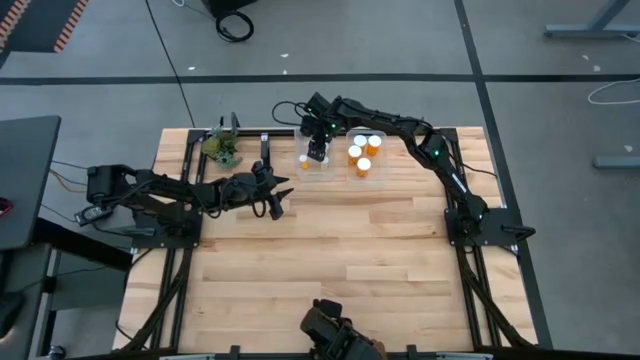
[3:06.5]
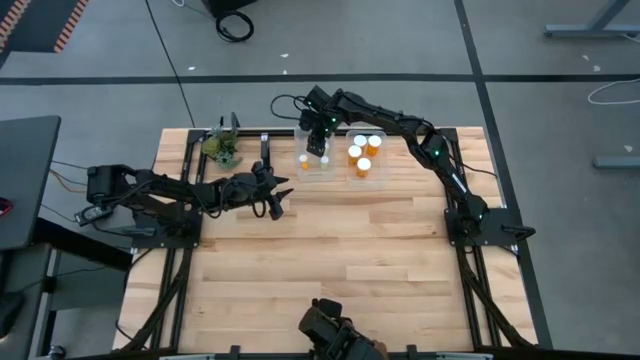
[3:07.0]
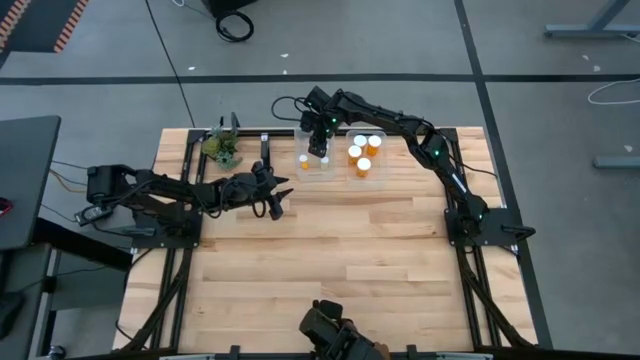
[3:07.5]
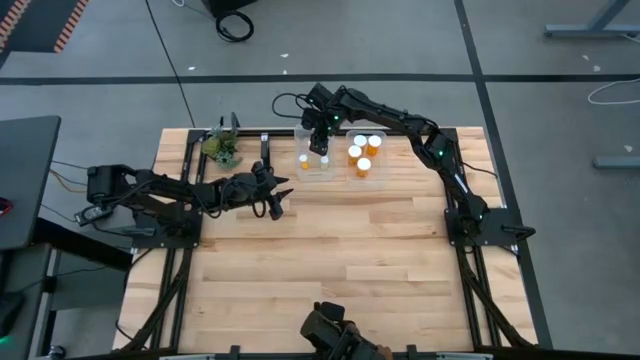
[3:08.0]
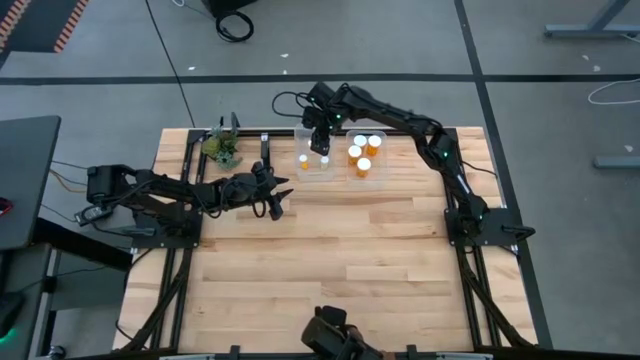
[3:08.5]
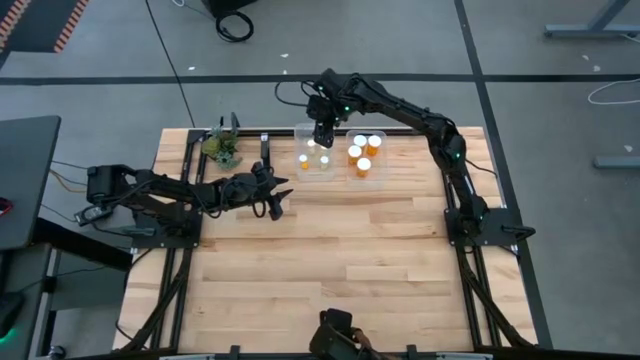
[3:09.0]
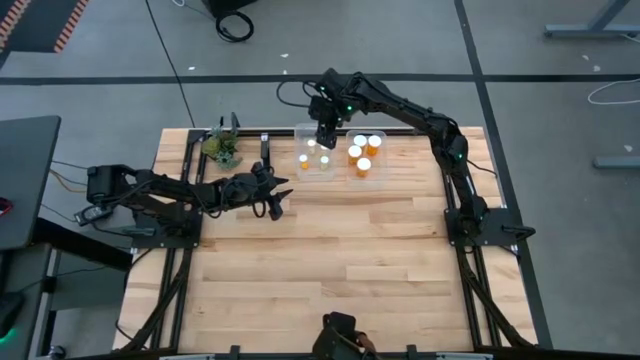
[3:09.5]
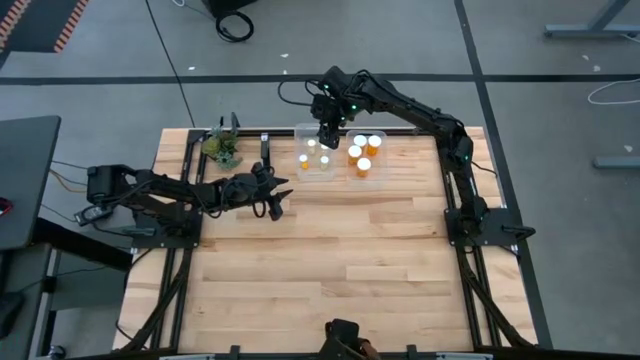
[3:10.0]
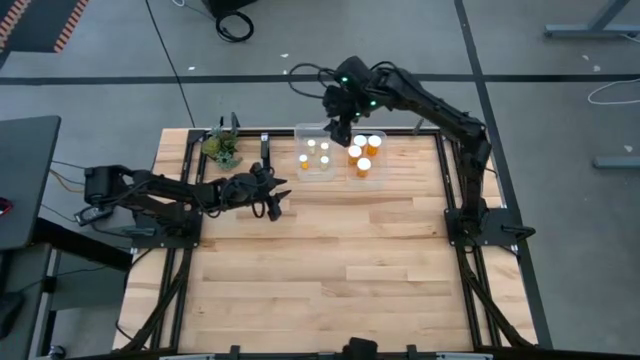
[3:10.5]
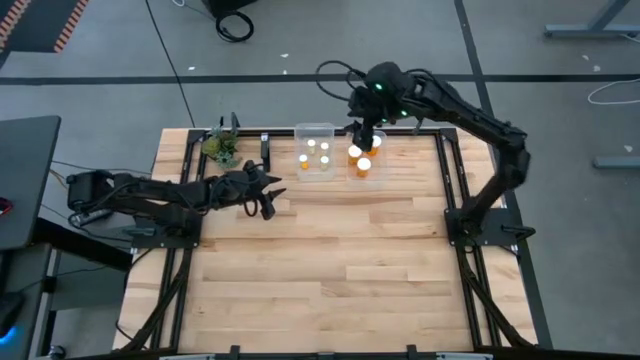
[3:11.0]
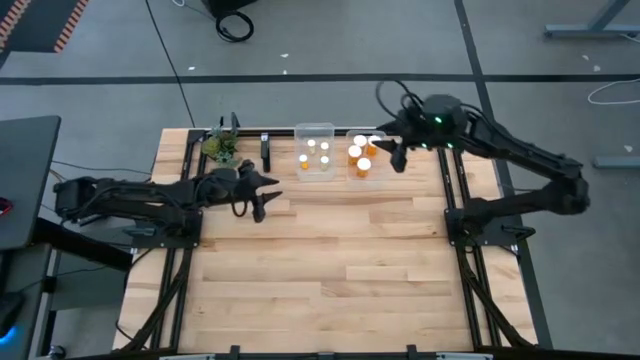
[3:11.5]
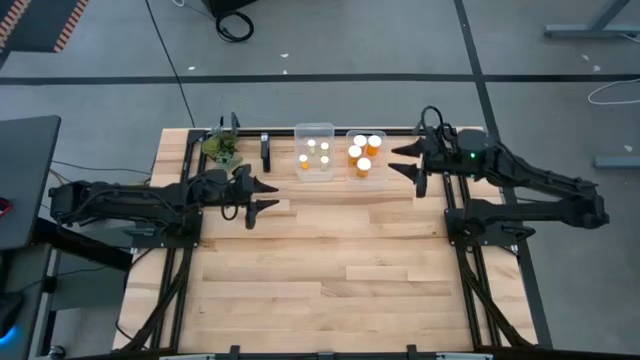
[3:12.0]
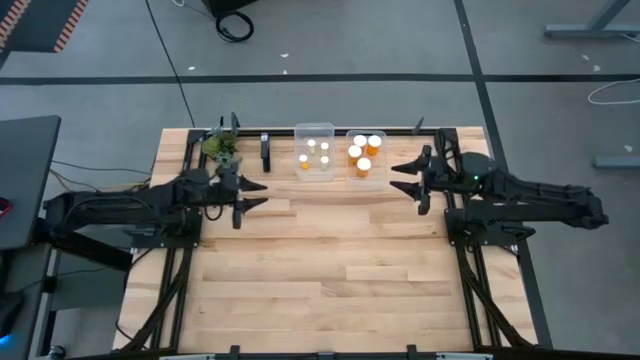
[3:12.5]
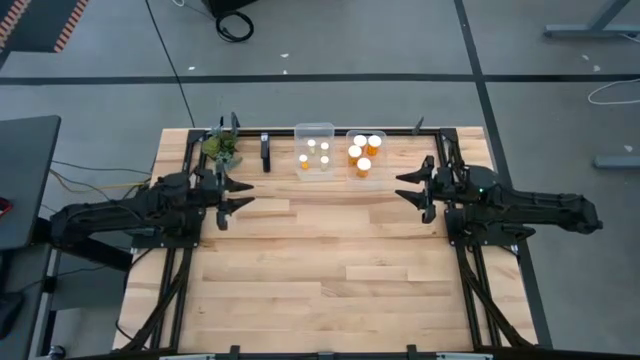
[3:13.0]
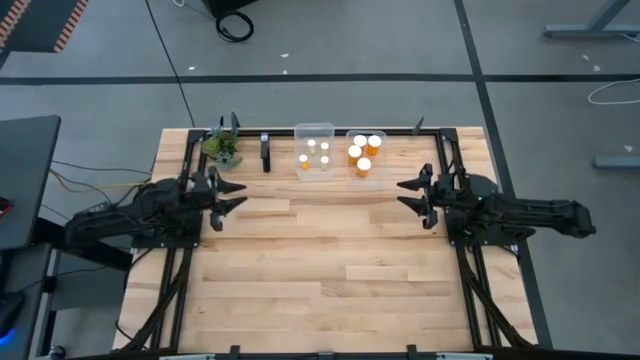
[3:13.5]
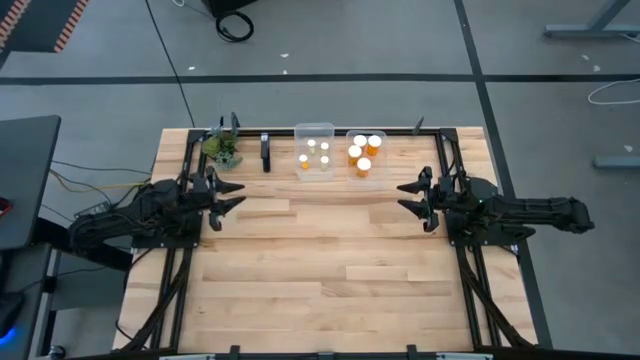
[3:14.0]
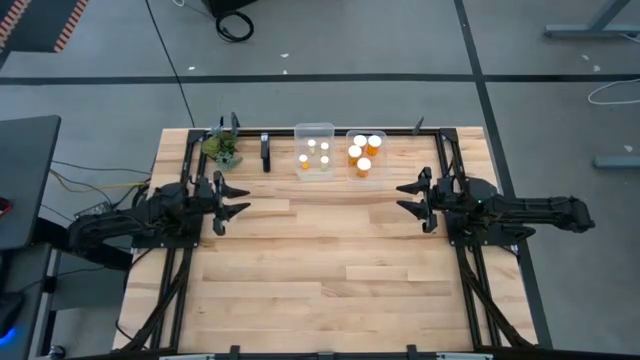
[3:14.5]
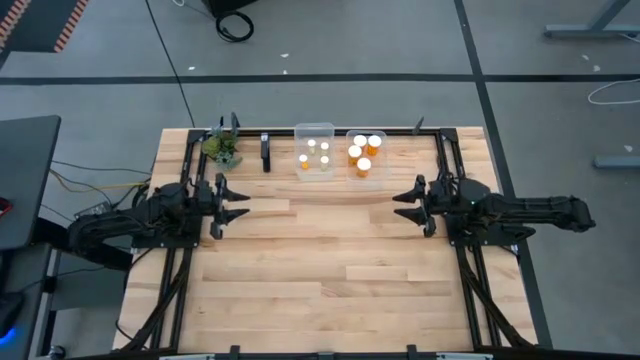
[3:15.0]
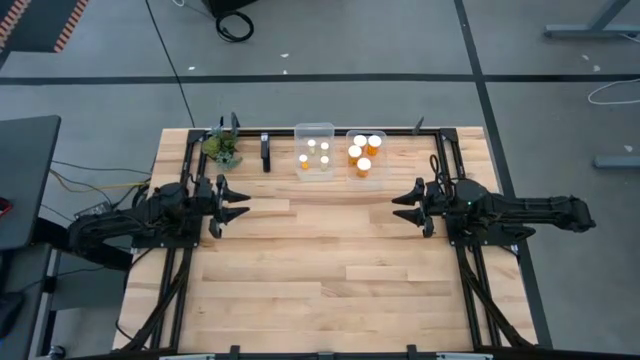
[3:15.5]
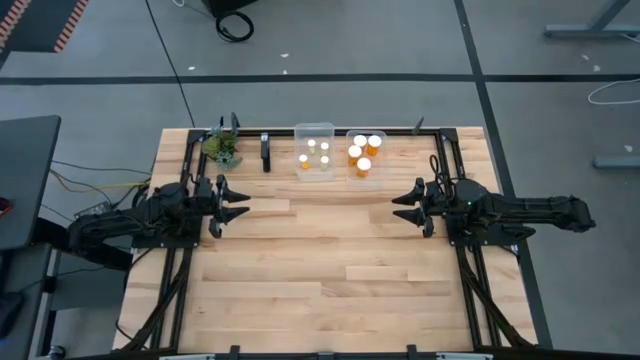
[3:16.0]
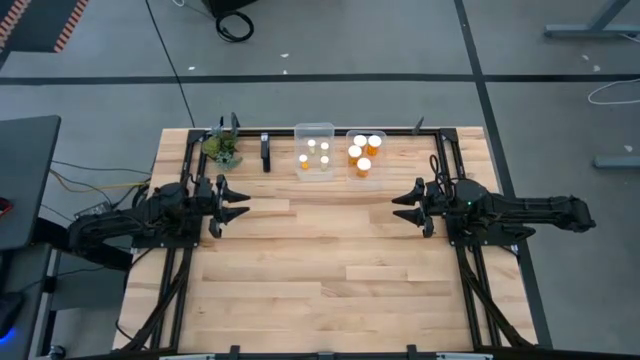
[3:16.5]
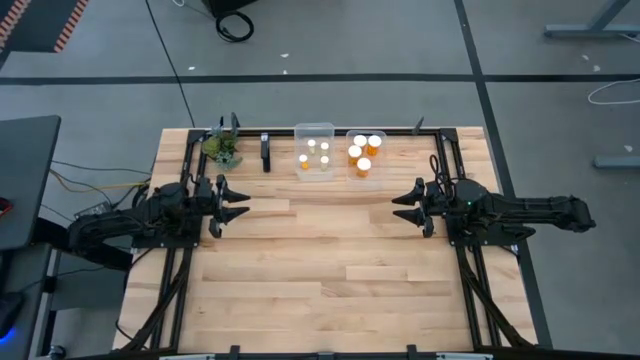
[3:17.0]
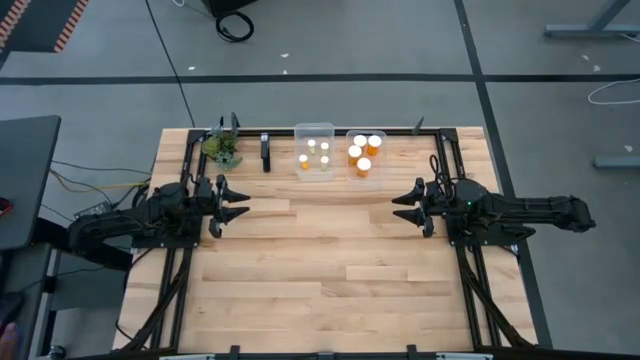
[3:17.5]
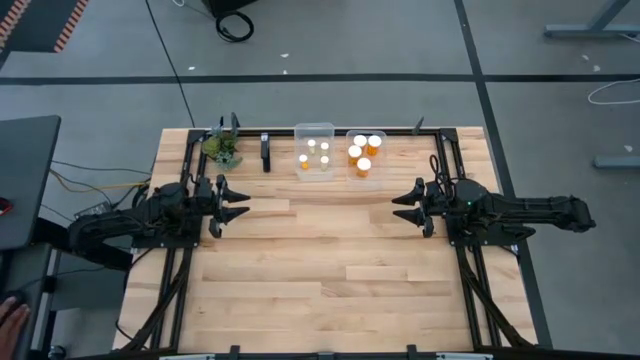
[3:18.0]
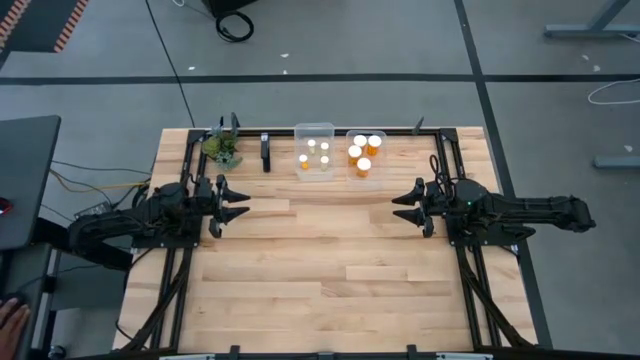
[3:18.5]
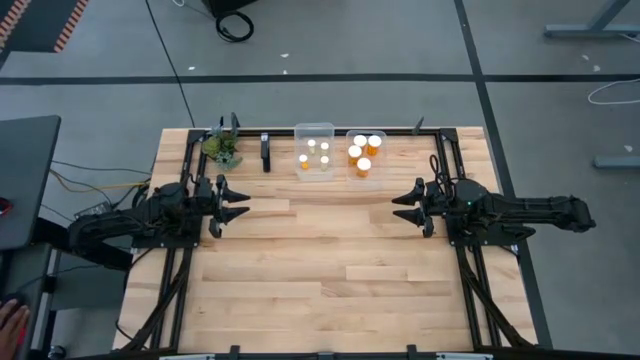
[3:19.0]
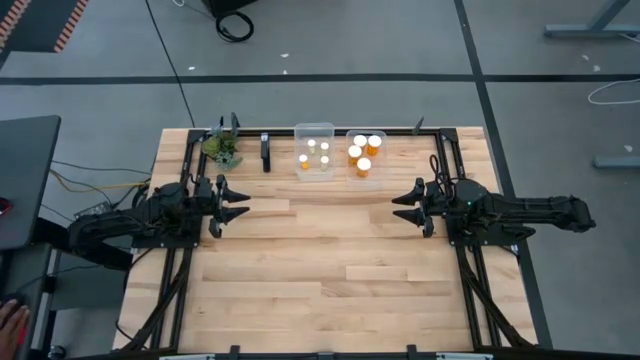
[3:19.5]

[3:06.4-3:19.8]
Task: Pick and place medicine bottles into bin by pill shape (circle, oval)
Return to Home Position

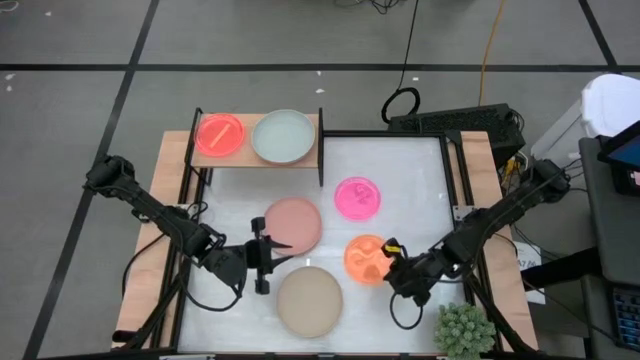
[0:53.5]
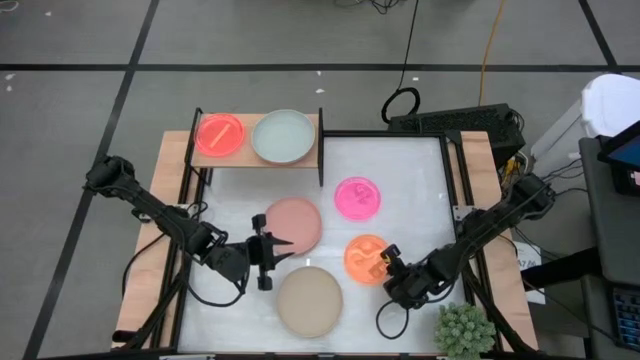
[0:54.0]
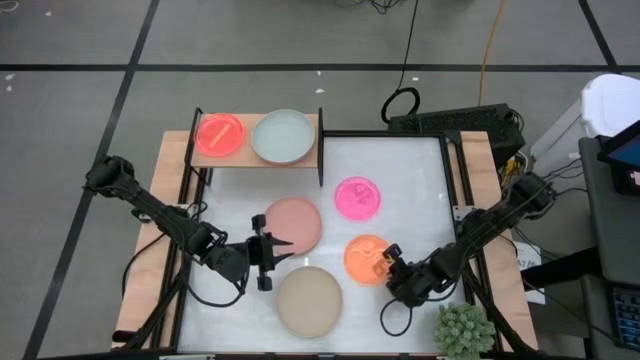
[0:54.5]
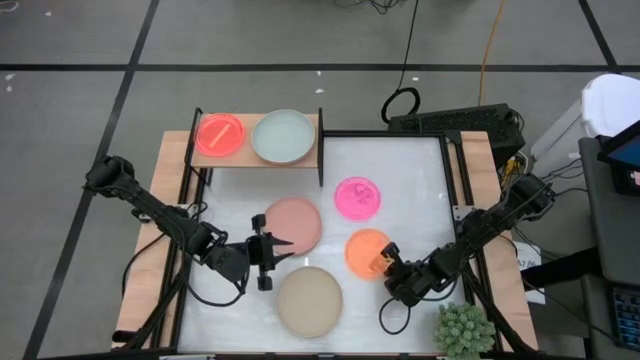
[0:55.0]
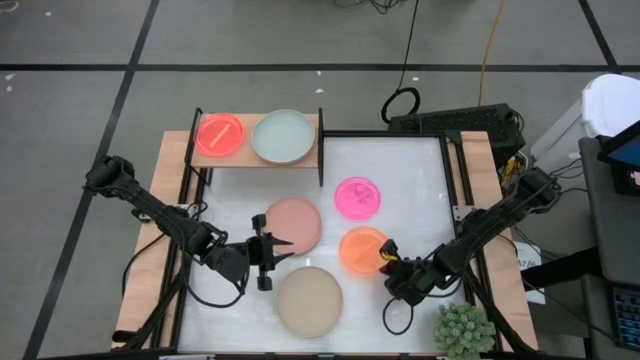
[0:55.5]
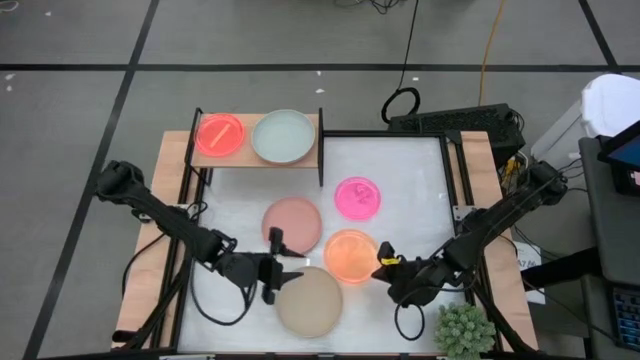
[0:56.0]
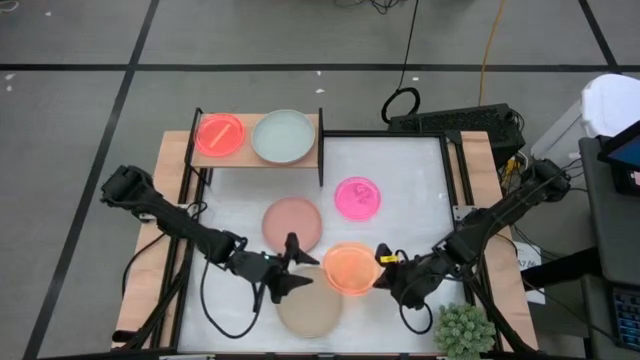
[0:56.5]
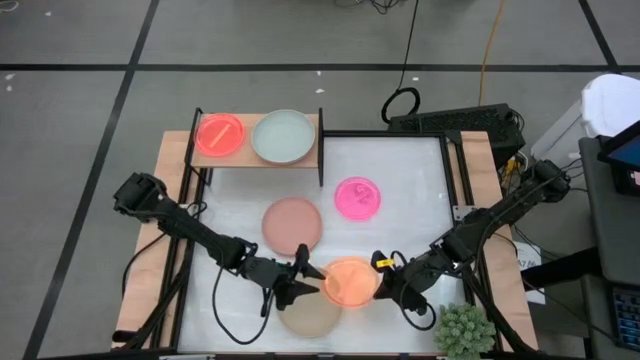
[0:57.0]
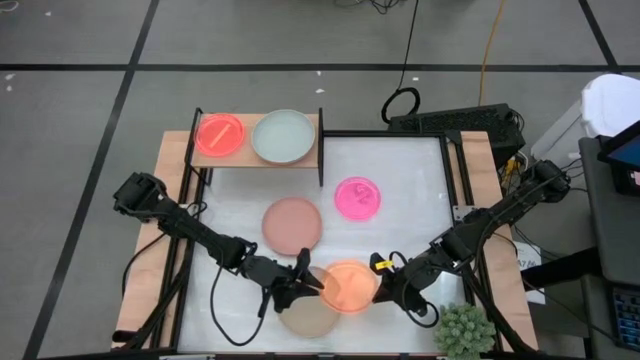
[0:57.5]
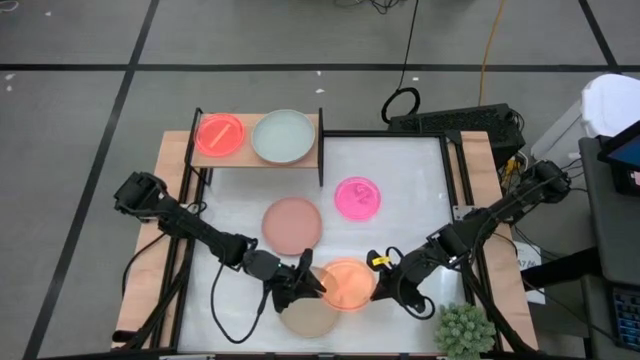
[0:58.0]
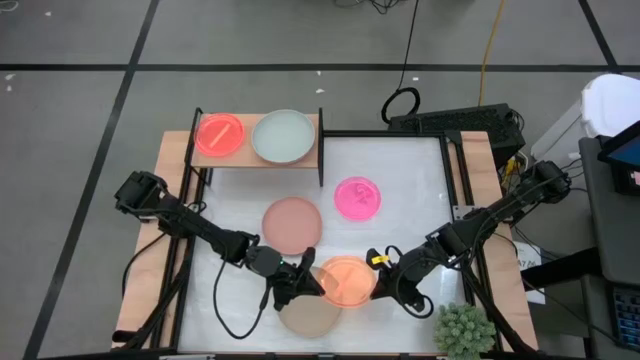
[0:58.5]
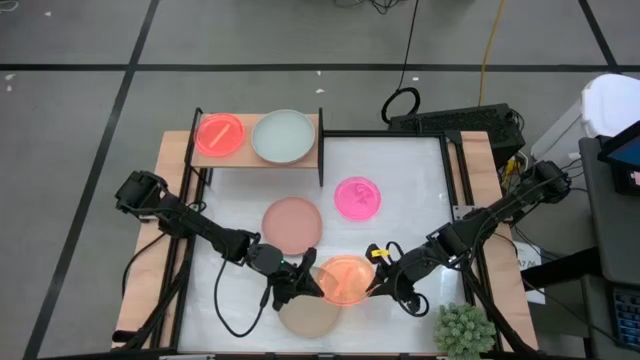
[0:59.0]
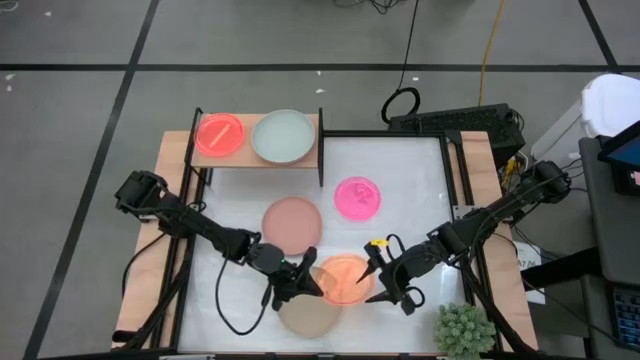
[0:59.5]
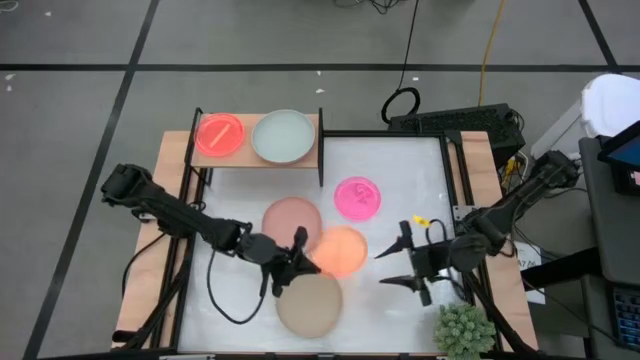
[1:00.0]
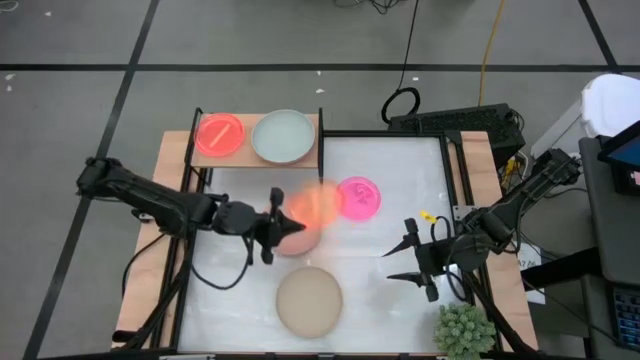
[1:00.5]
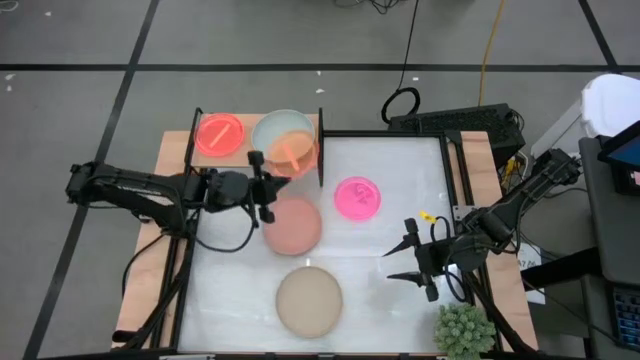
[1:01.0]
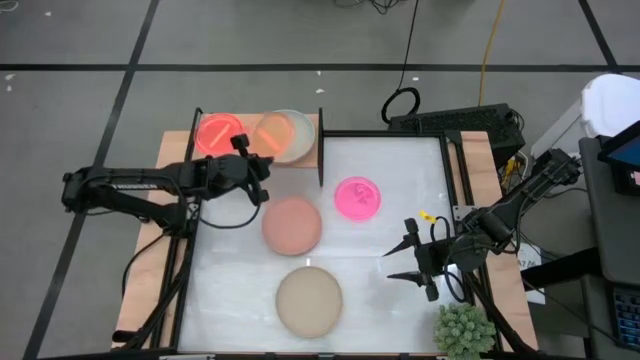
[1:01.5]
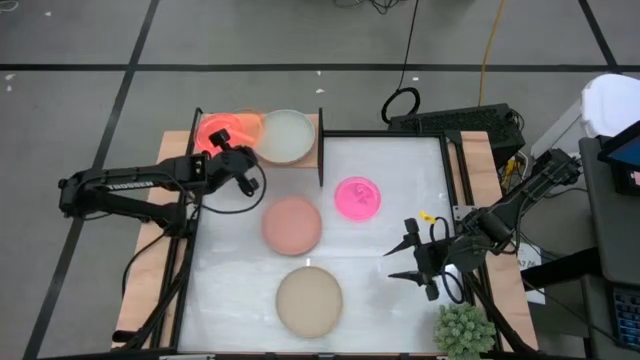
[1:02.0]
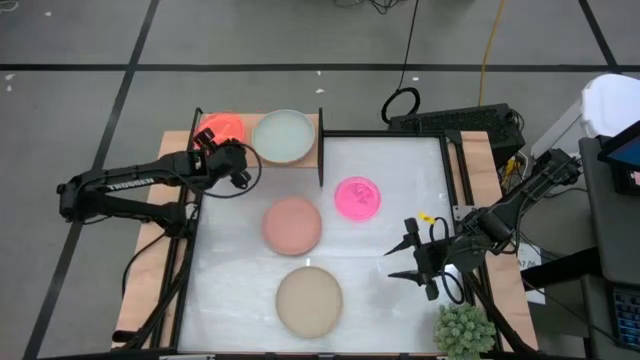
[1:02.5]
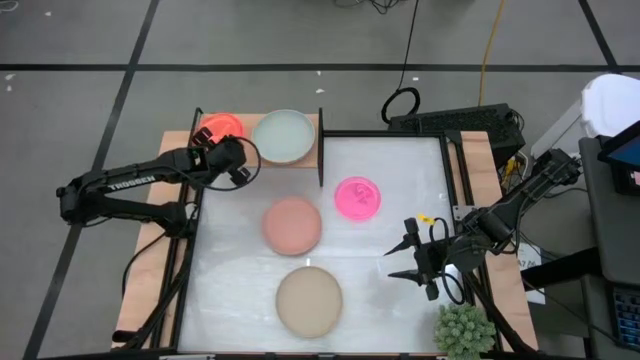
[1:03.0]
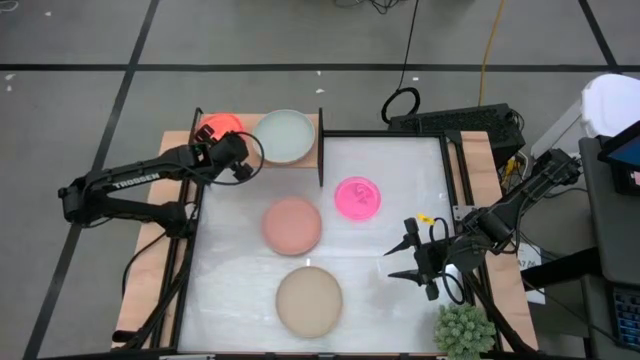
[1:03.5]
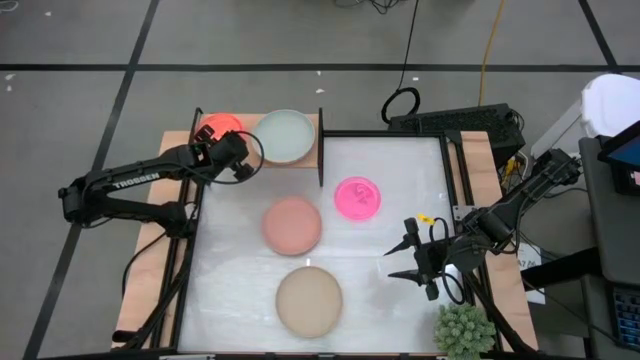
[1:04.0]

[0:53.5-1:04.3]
Task: Place and stack plates onto a shelf
Stack the small orange plate on top of the small orange plates
